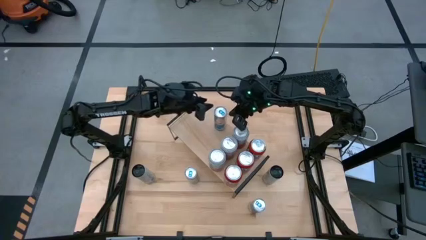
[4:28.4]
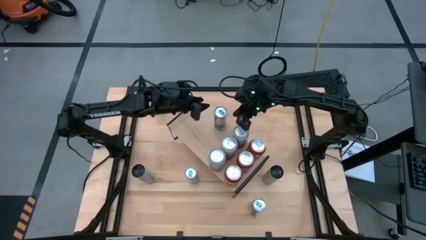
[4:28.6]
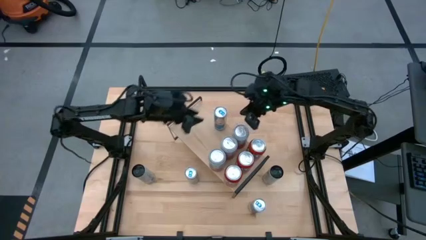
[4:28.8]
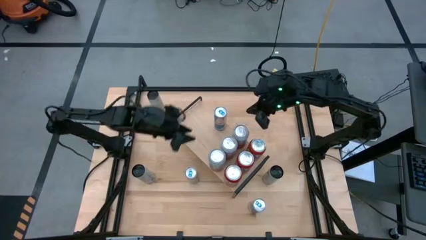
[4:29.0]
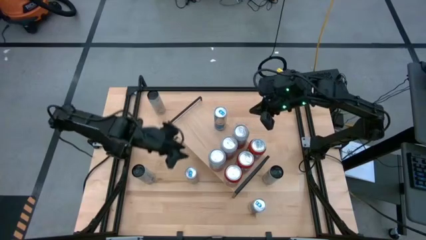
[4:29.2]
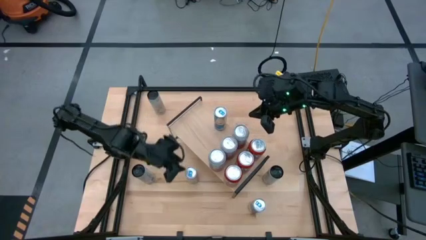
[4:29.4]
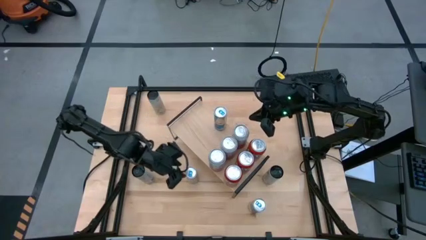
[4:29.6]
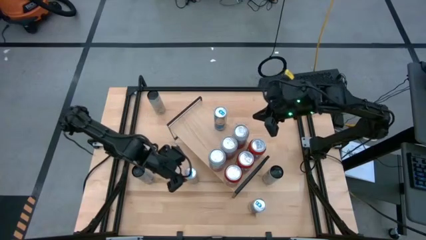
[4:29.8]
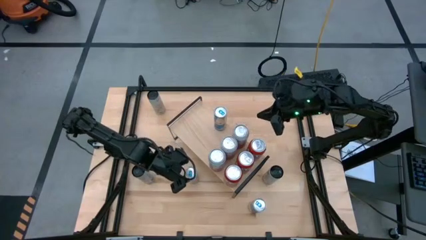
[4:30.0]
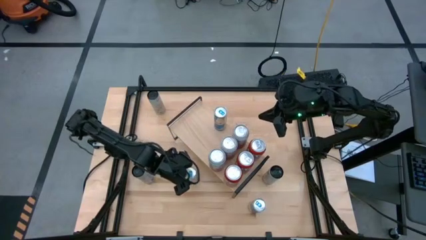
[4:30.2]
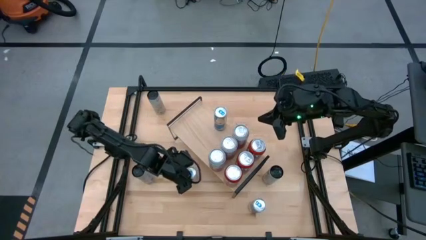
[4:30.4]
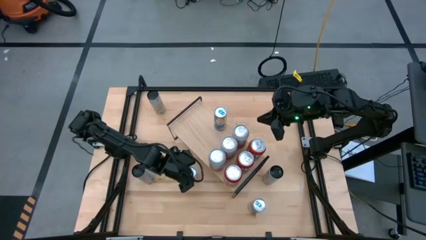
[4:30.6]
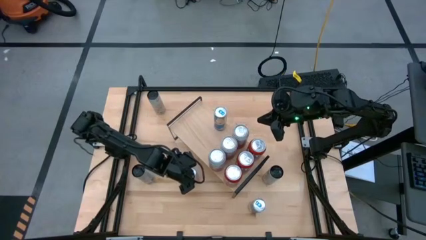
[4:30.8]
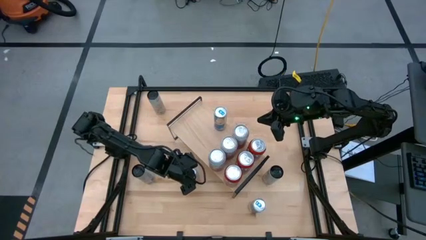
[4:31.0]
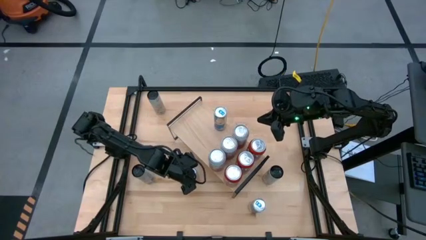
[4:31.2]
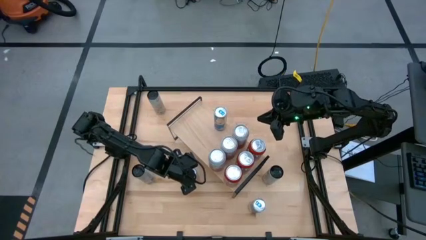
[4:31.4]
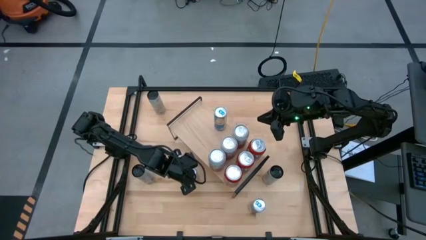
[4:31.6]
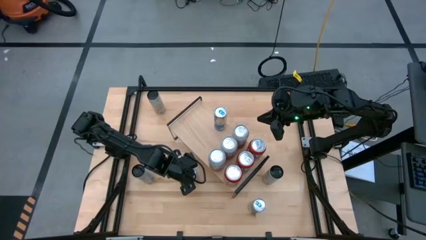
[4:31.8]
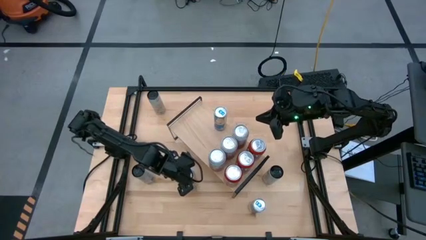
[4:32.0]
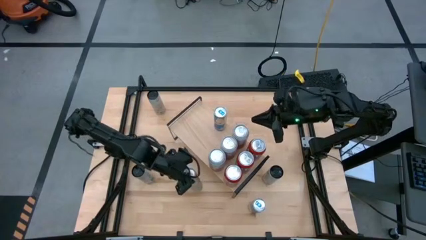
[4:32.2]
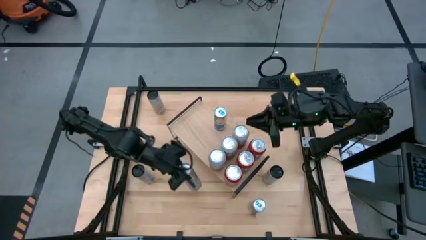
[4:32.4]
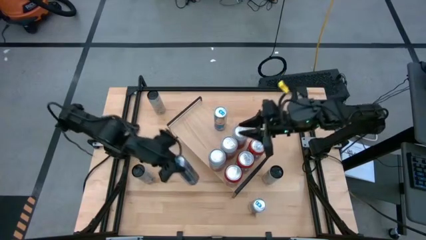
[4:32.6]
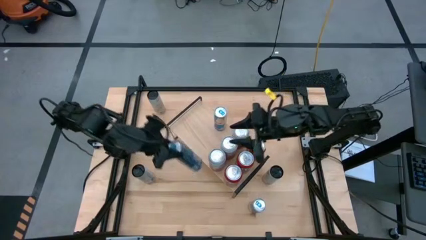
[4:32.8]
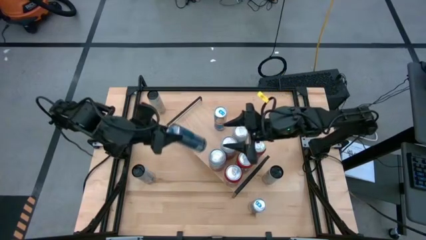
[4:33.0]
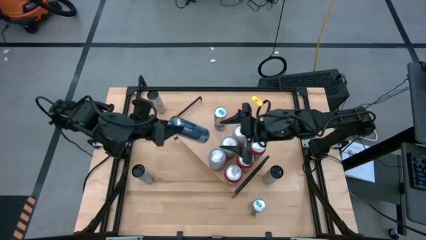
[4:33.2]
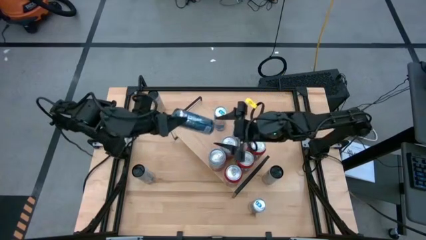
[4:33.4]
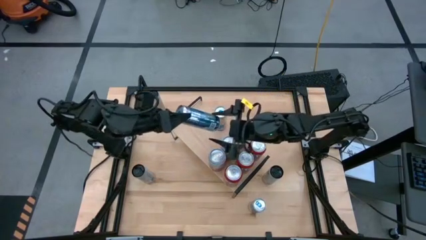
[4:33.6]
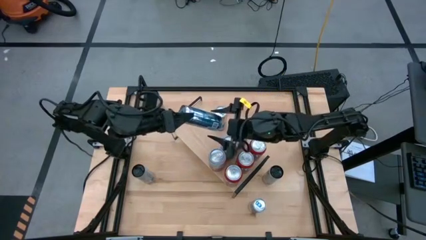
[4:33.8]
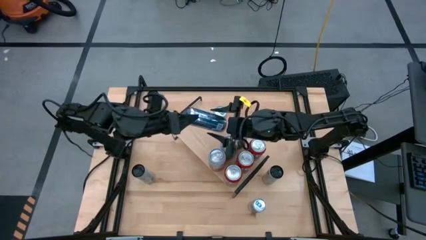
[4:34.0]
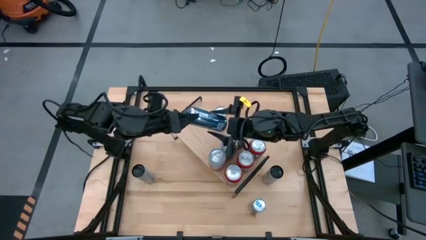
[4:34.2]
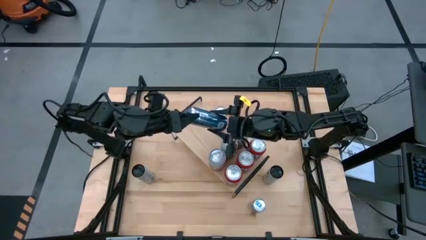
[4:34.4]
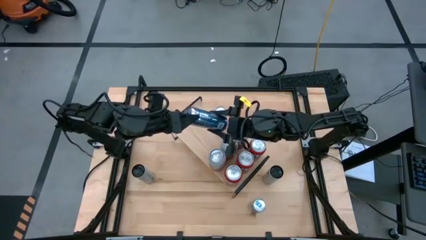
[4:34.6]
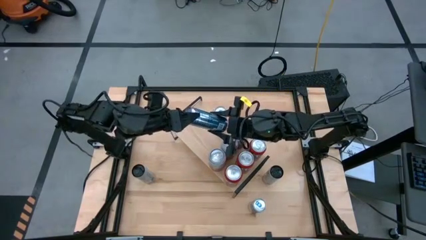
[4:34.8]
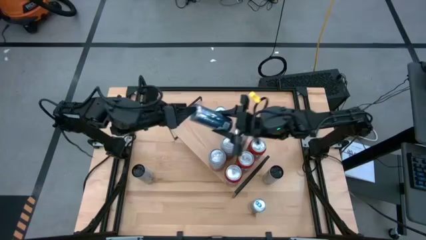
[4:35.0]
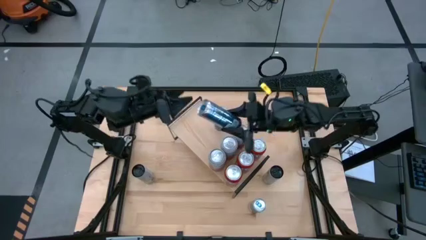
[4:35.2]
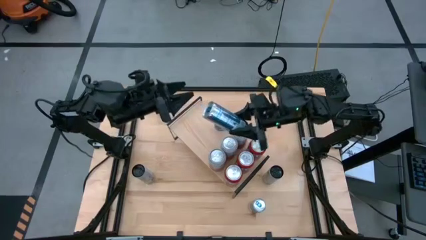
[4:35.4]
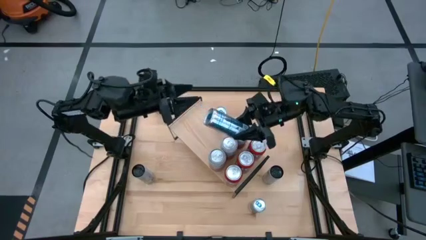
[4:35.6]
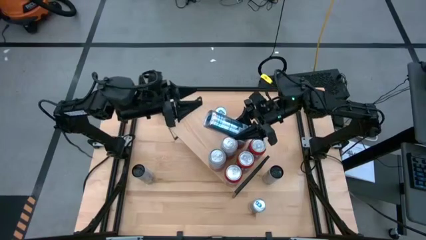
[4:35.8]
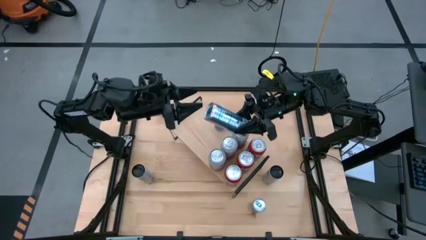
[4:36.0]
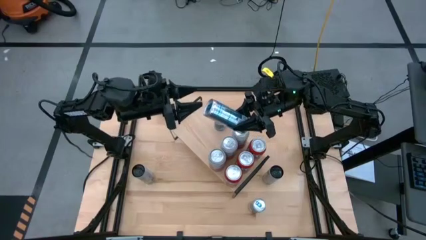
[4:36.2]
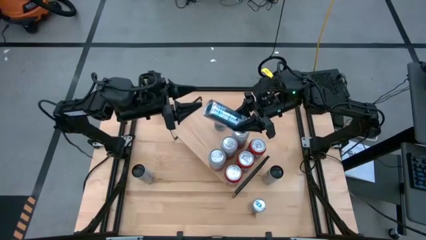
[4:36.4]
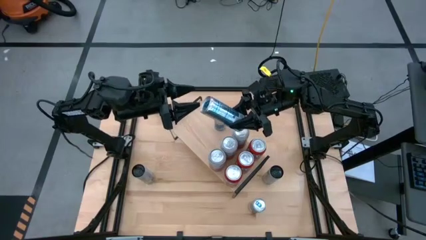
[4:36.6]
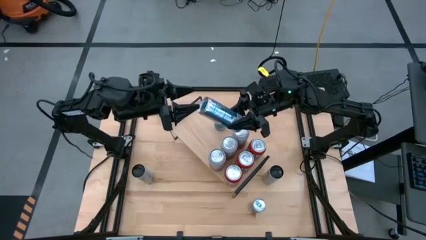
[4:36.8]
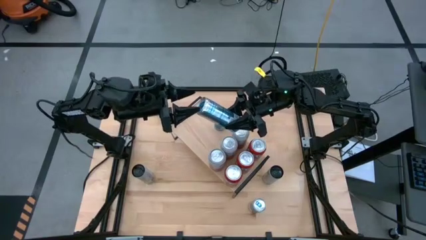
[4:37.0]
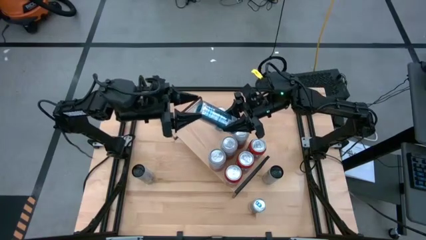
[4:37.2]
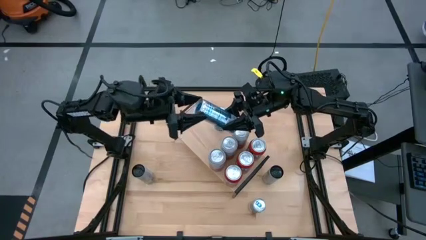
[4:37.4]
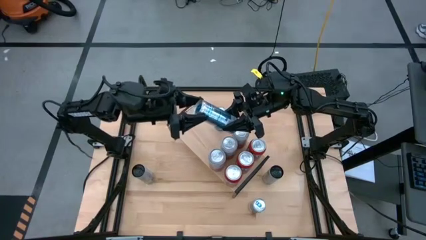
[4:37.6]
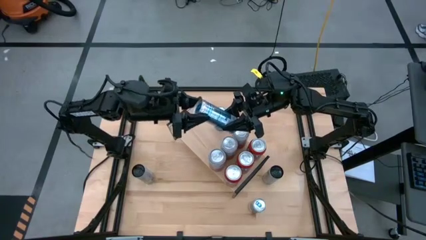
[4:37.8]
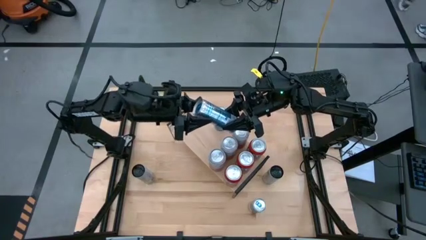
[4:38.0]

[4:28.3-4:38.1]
Task: Place canned beverage on shelf
Put the left blue soda can on the shelf aligned with the other blue soda can

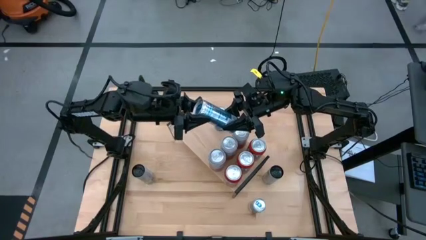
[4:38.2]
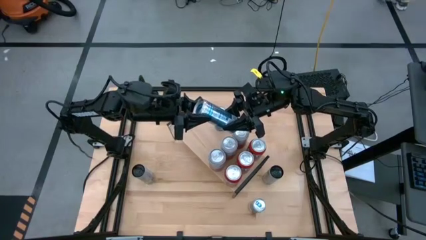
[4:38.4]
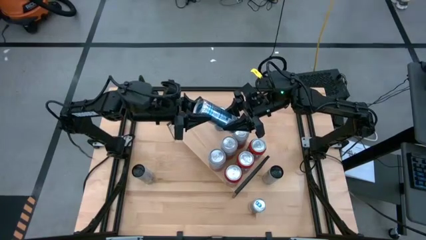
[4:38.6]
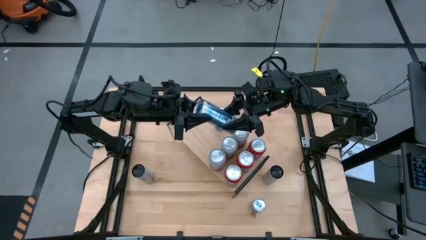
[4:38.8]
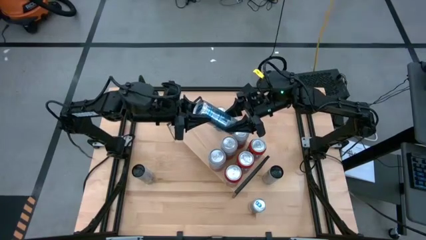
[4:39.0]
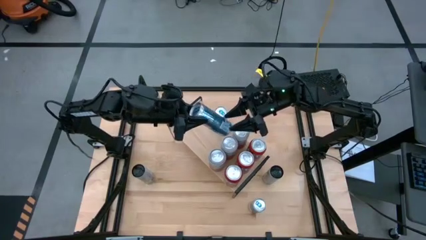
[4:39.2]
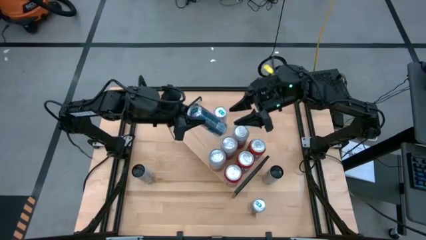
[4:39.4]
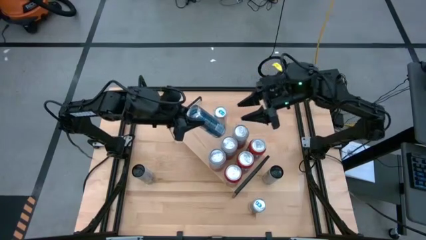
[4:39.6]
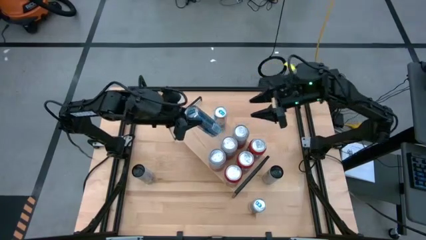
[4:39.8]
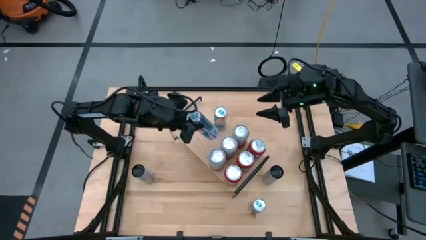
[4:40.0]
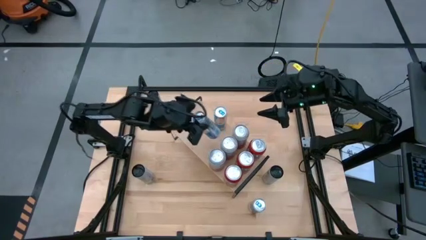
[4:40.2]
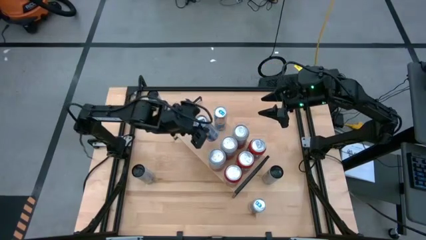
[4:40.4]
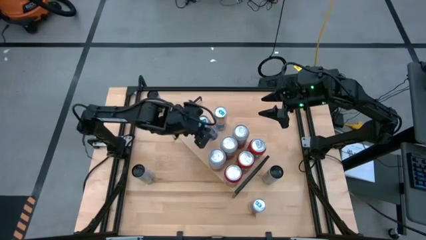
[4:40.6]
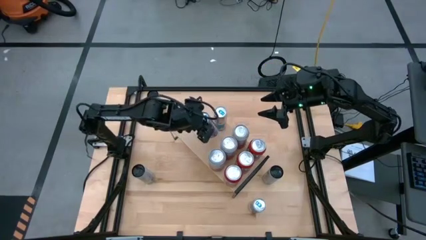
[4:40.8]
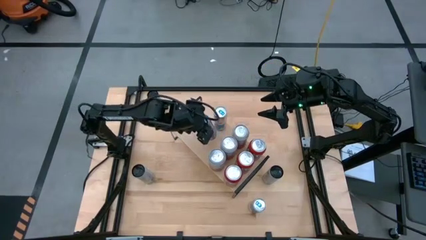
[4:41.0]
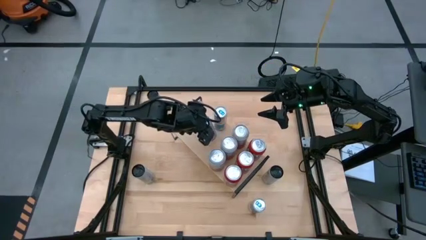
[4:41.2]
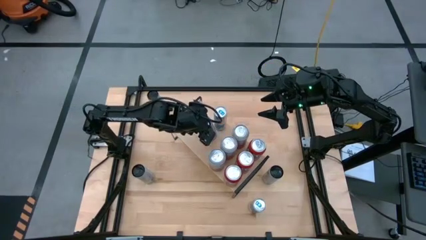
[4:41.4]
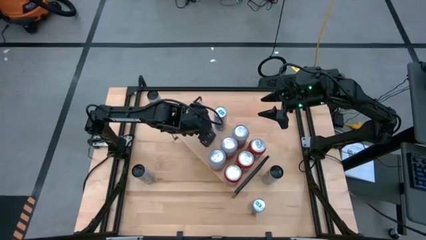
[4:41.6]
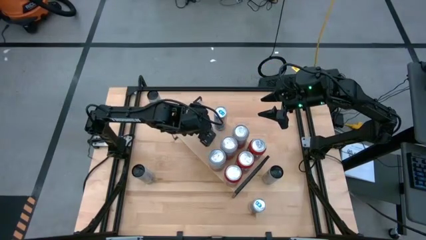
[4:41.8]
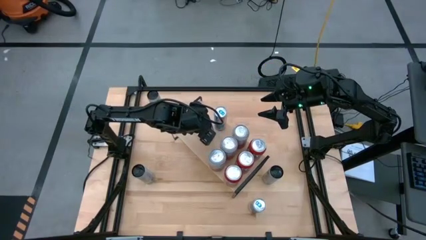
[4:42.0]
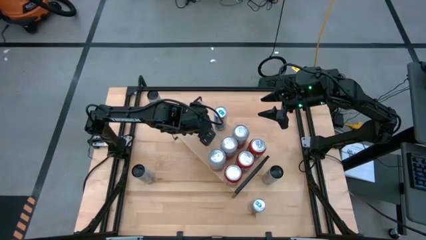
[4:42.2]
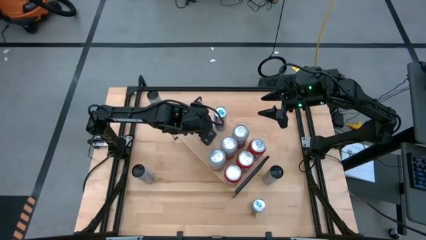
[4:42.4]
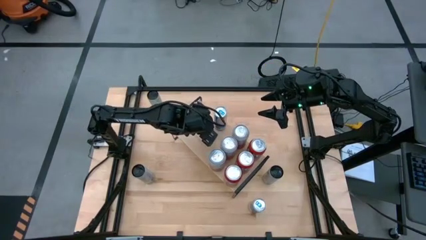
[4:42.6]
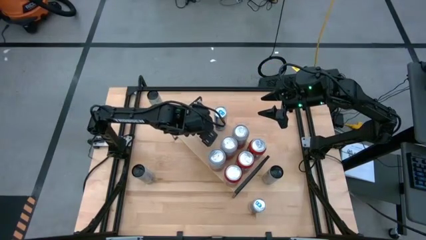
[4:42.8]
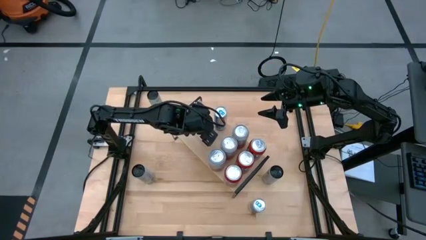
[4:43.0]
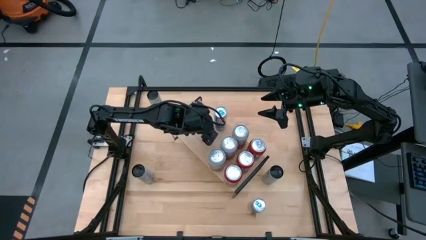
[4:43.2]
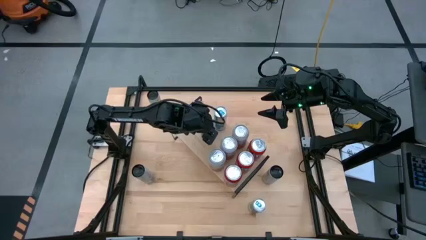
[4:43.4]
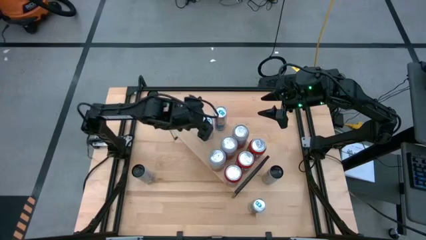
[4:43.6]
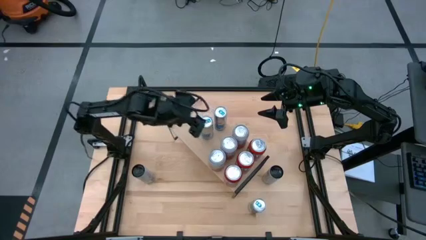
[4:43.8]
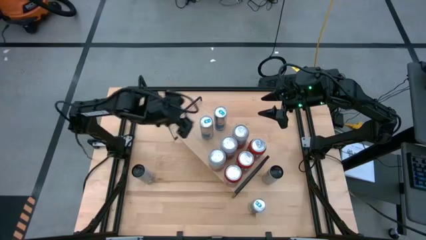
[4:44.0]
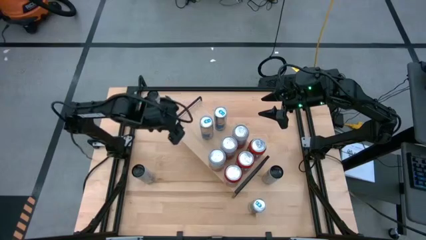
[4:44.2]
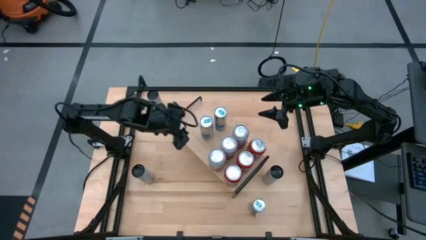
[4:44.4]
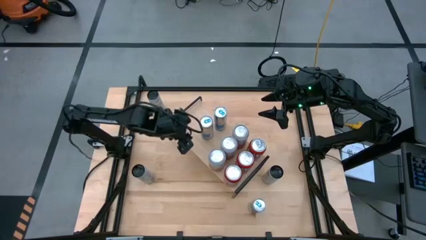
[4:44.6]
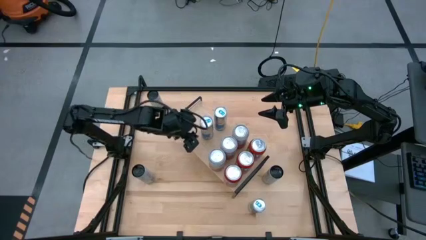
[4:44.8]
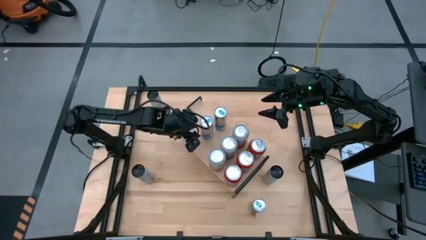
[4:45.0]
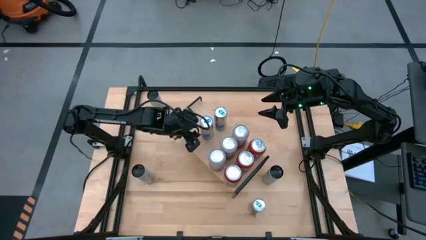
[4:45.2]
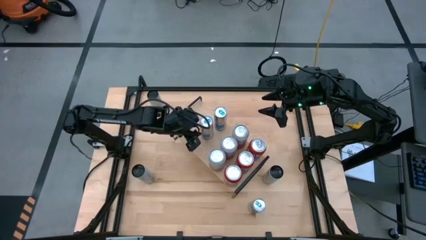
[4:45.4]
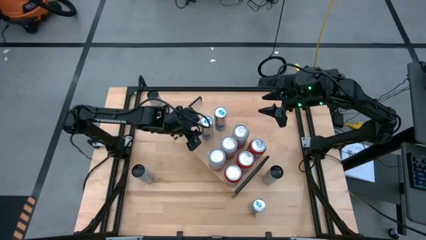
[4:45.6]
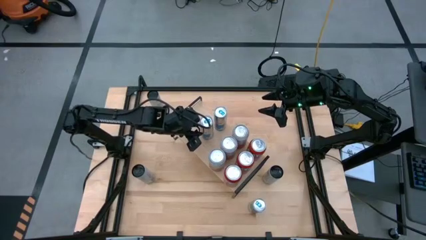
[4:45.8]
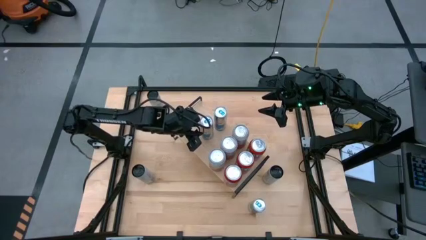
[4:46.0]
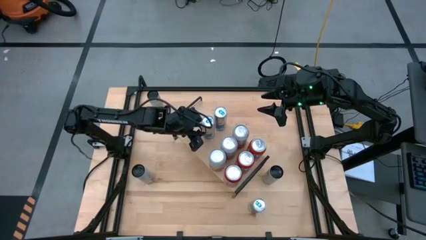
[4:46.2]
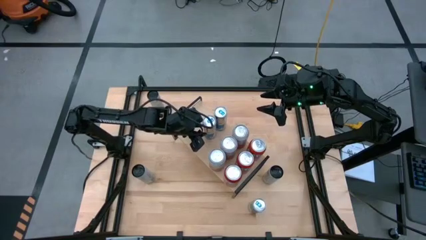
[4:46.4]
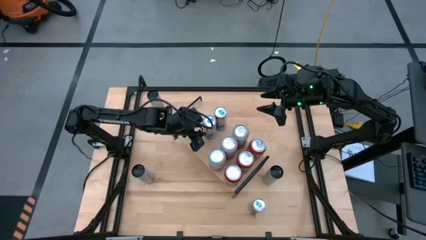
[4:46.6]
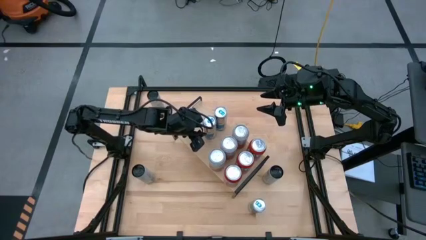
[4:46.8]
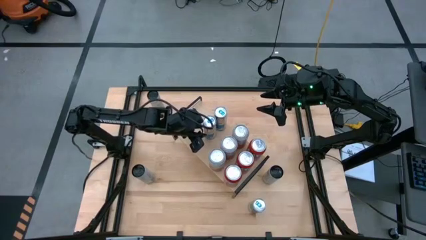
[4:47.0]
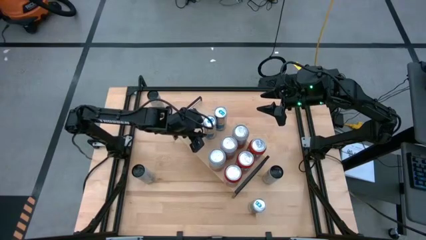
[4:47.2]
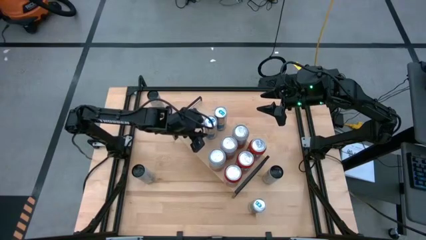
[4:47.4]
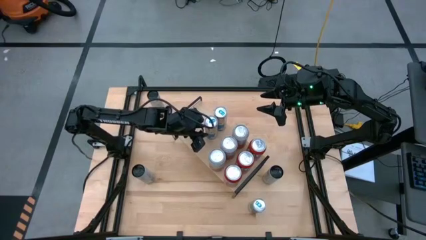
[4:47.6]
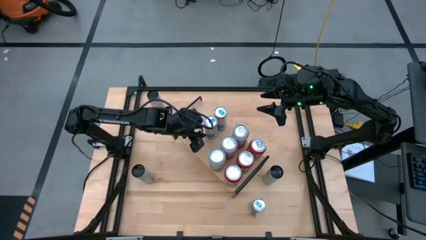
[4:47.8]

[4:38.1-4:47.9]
Put the left blue soda can on the shelf aligned with the other blue soda can
